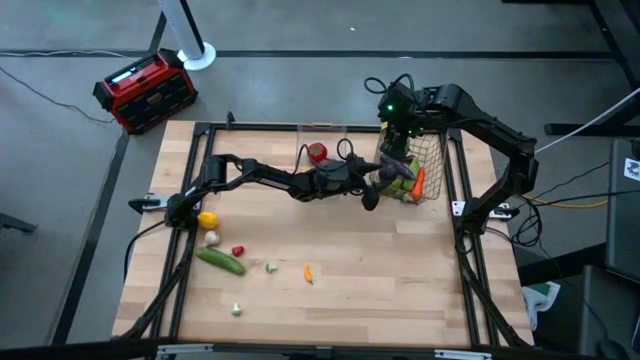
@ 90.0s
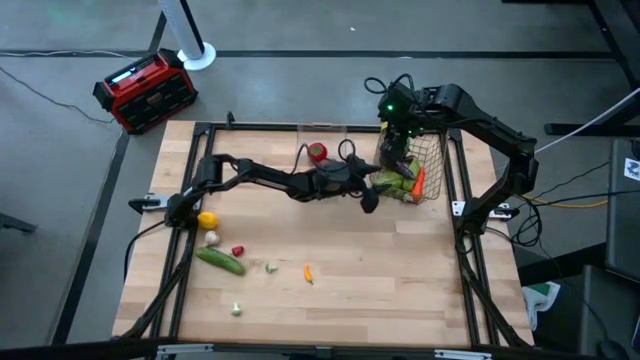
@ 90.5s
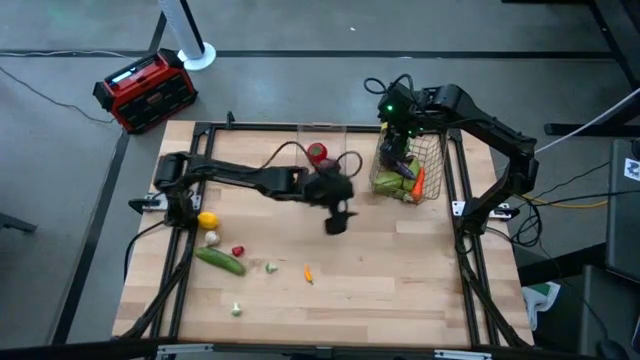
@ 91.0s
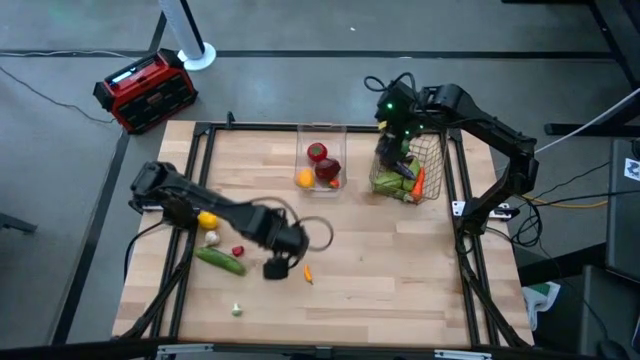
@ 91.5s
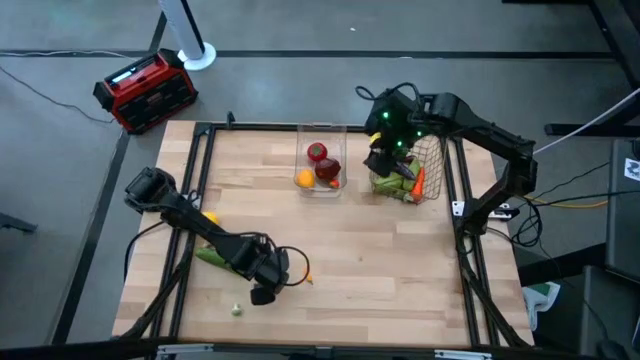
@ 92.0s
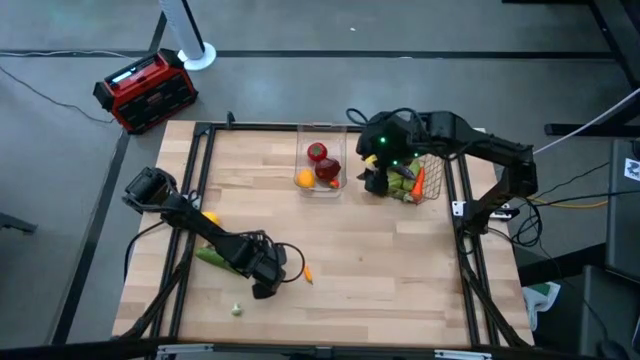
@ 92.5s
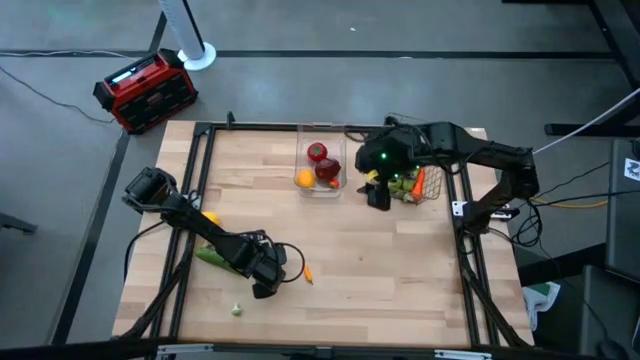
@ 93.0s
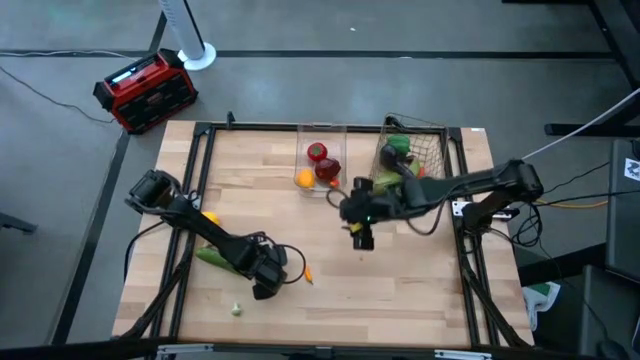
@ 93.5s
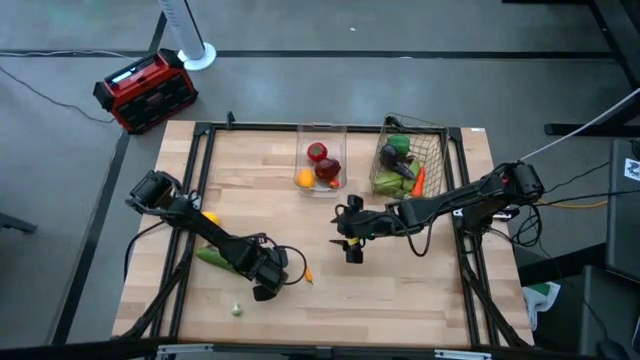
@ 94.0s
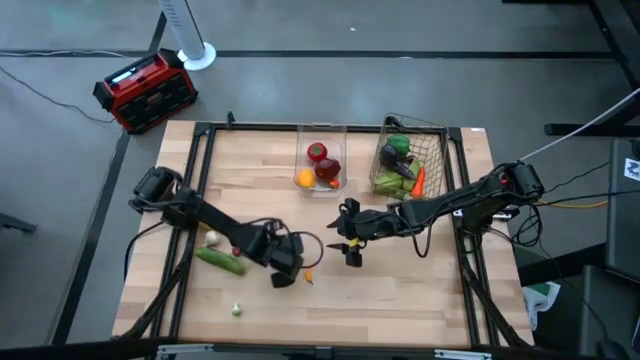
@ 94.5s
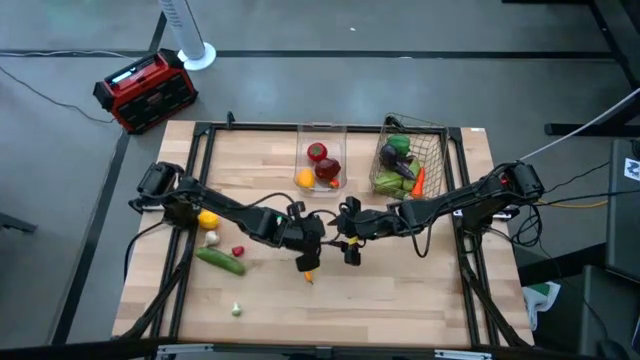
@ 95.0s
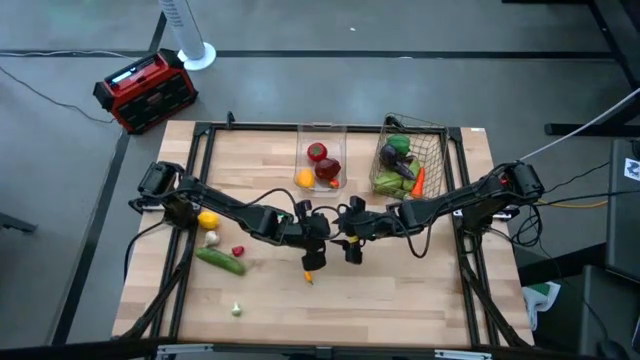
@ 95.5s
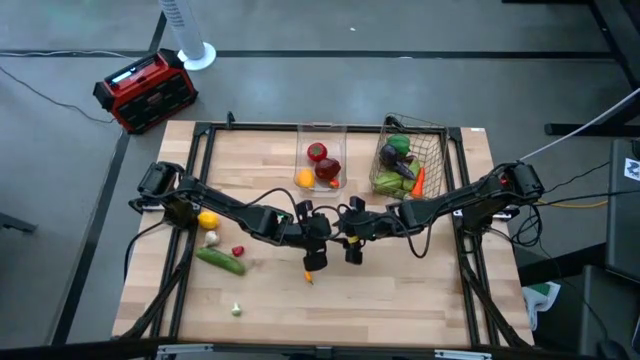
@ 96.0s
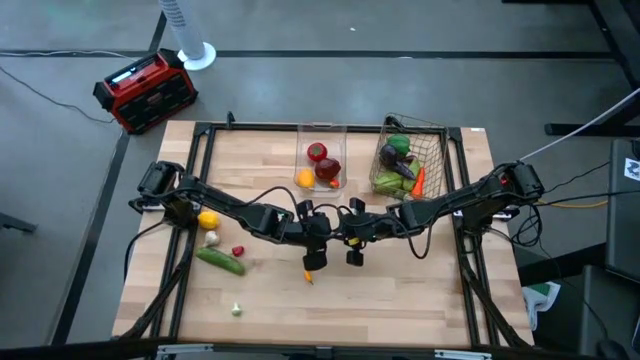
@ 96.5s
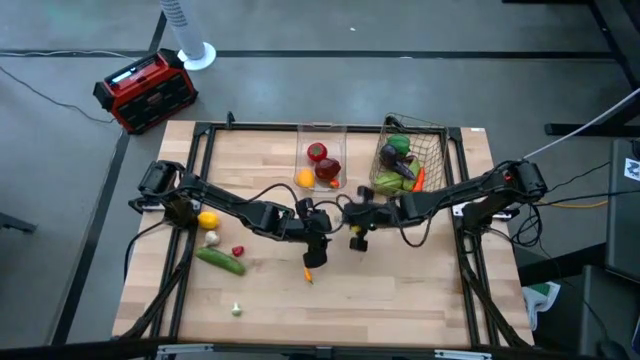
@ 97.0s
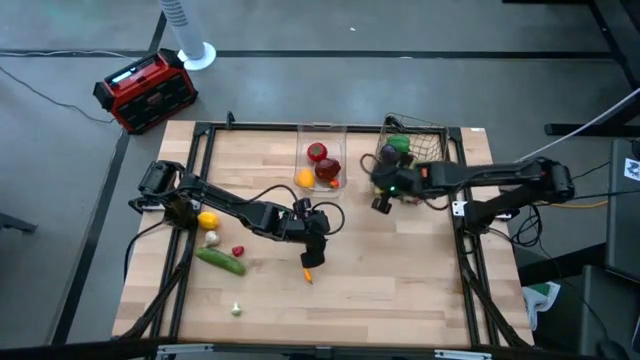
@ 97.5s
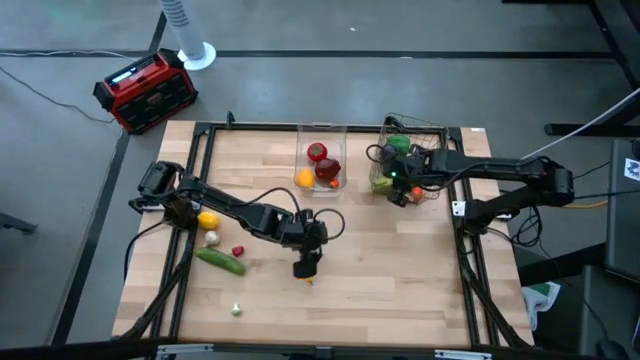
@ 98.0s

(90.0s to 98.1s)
Task: Sort produce into baskets
Put the green mushroom into the wire basket

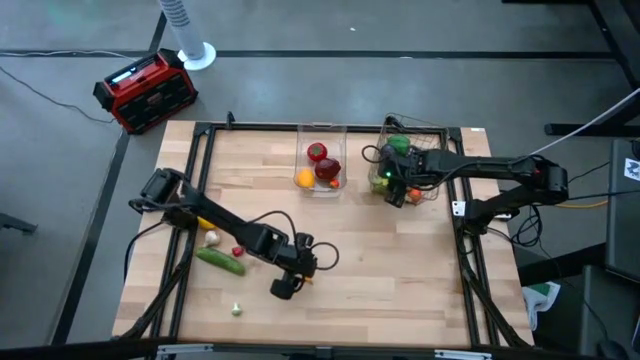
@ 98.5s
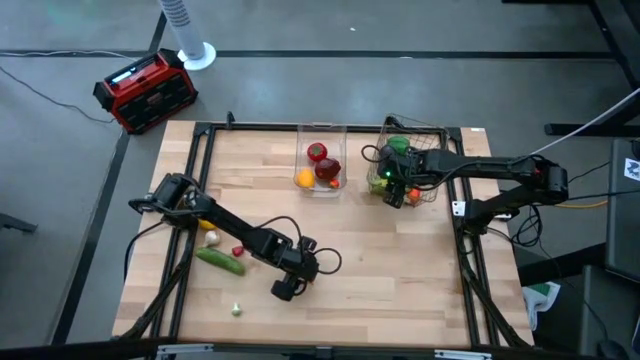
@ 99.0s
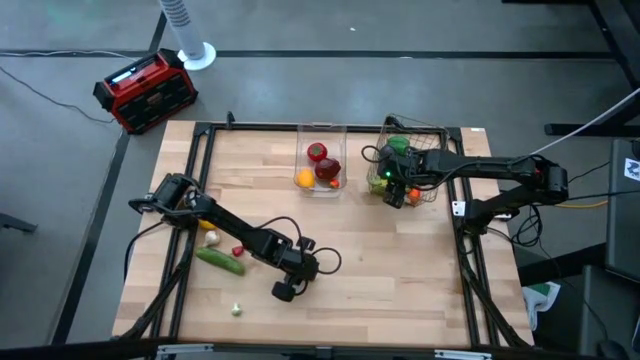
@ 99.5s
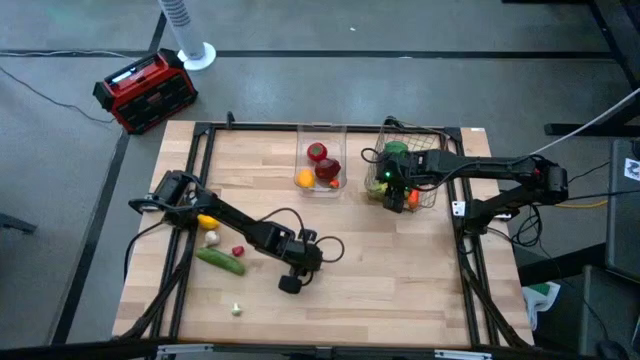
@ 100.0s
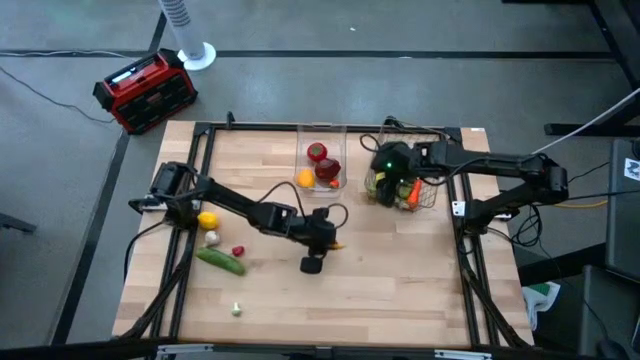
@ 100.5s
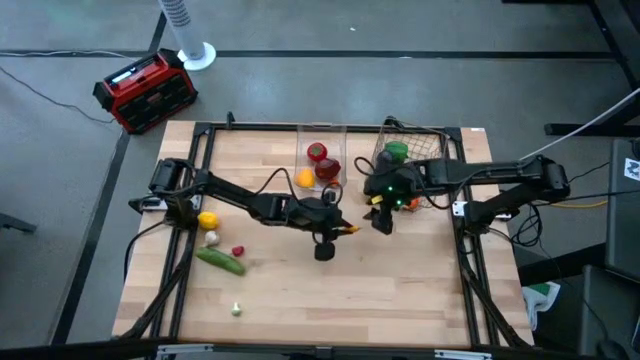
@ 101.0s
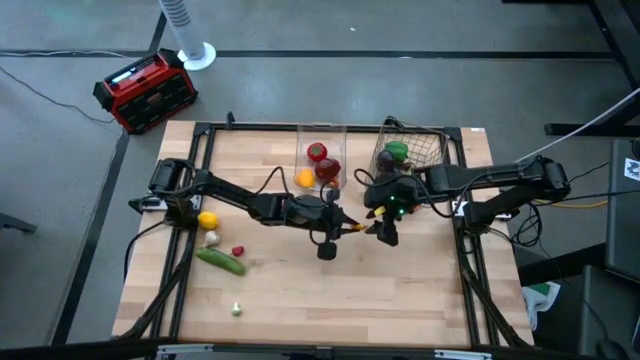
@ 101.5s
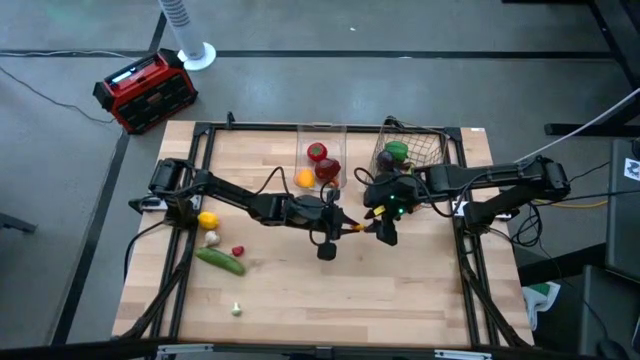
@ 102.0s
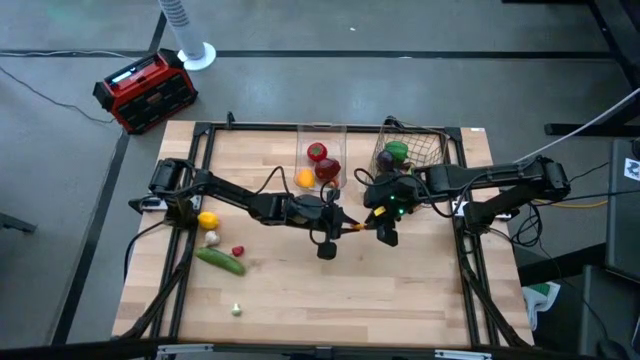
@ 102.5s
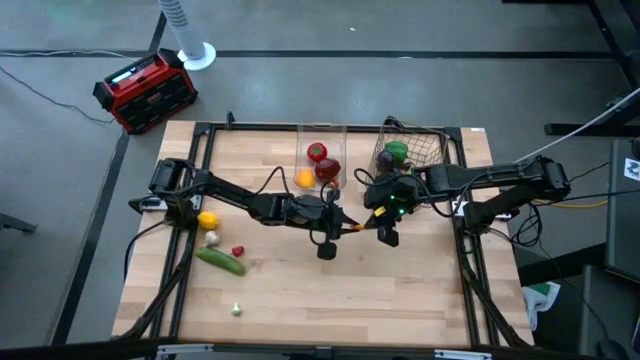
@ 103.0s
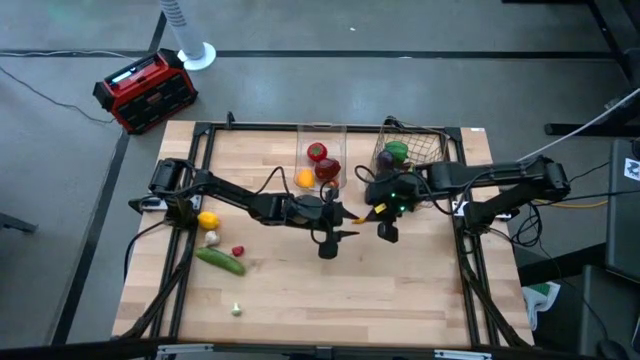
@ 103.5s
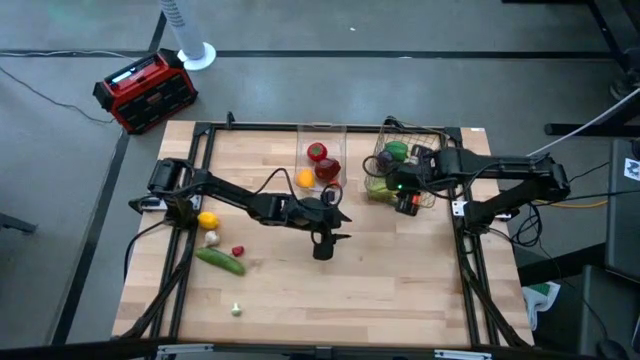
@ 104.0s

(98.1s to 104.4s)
Put the yellow chili pepper into the wire basket

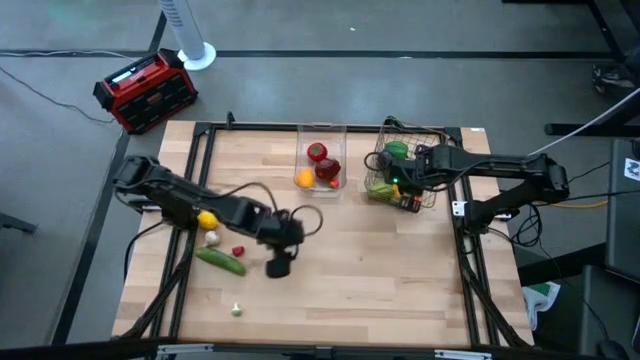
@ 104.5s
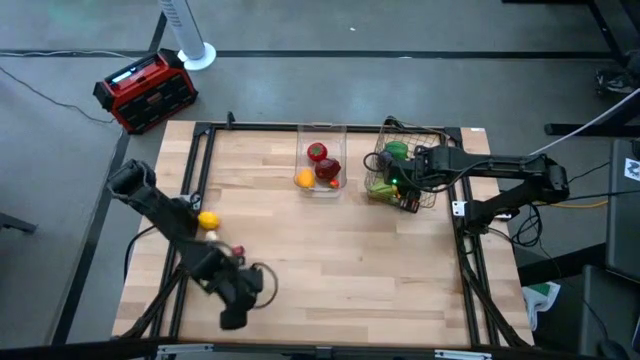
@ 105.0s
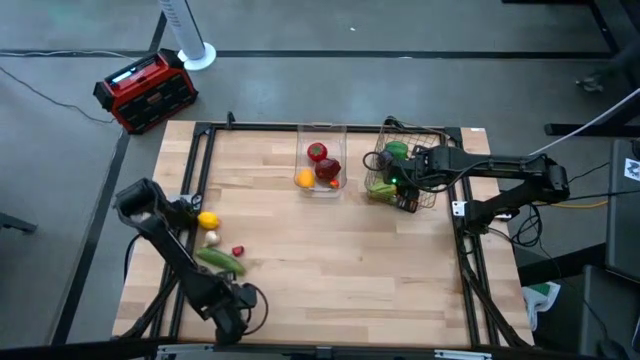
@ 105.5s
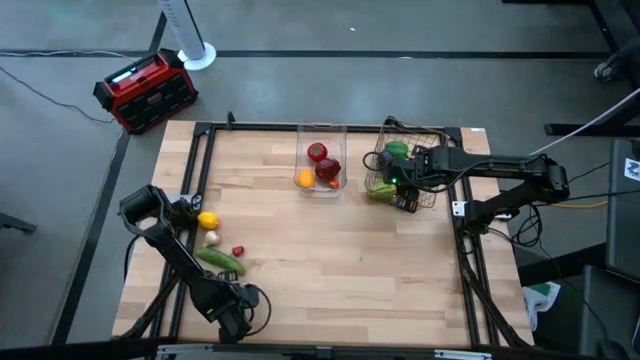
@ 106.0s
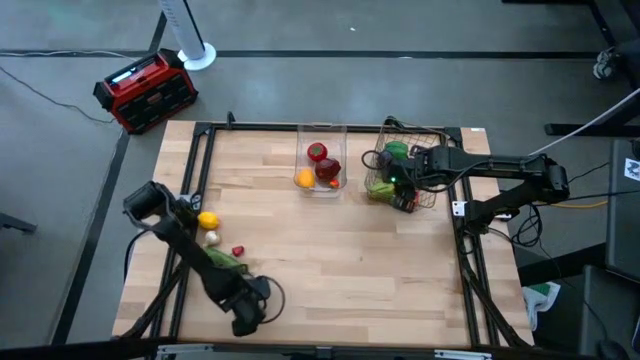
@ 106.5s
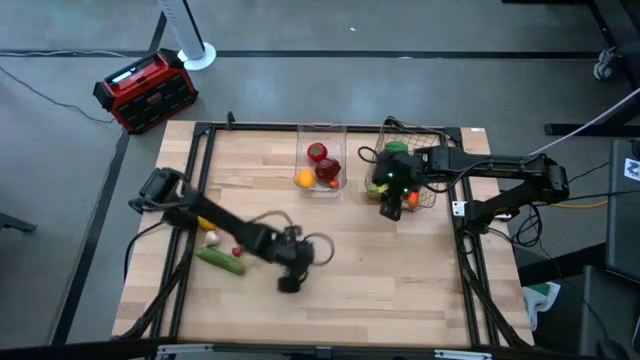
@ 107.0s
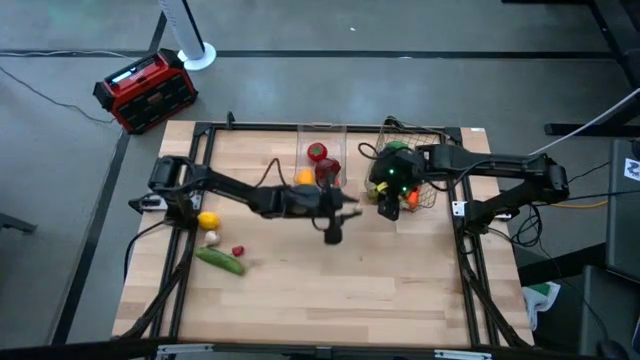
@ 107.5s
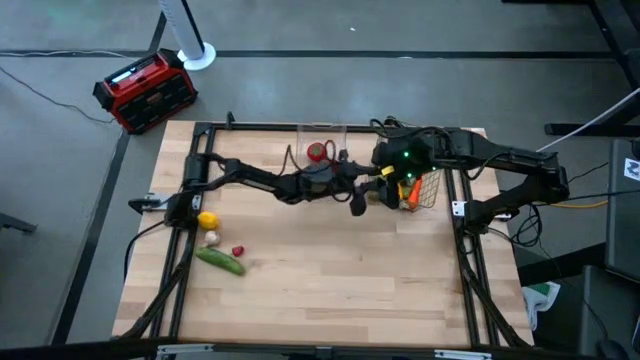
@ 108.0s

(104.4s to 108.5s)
Put the green mushroom into the wire basket
